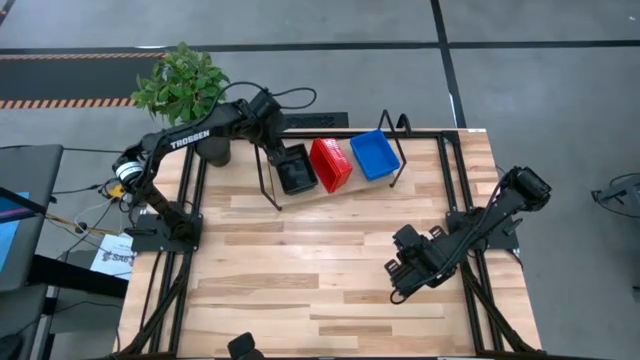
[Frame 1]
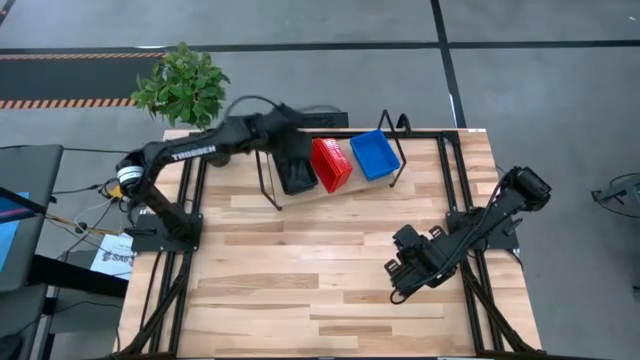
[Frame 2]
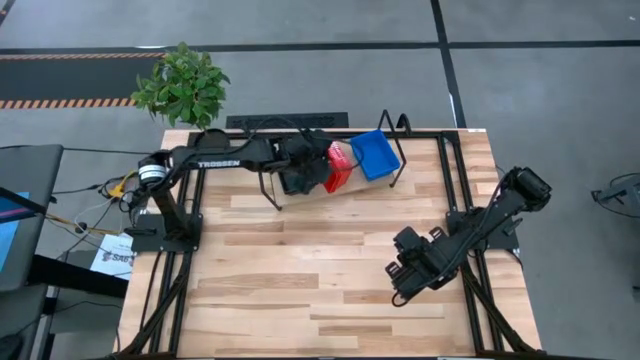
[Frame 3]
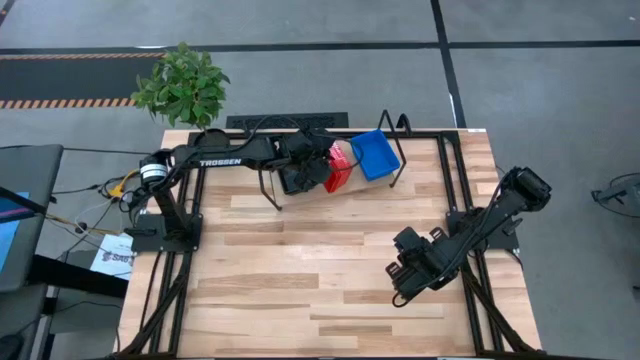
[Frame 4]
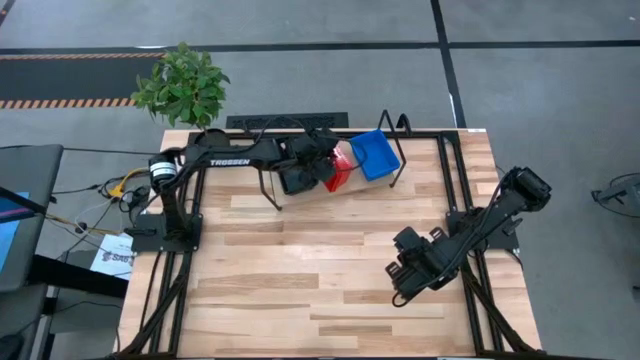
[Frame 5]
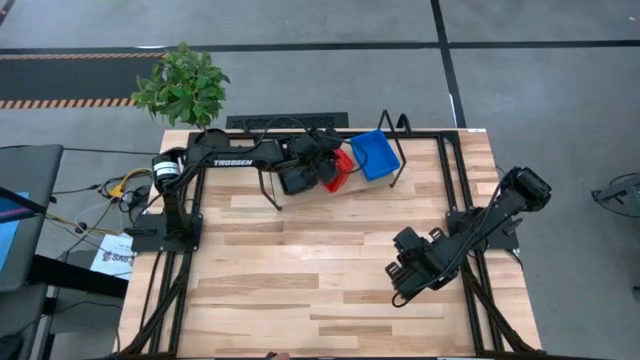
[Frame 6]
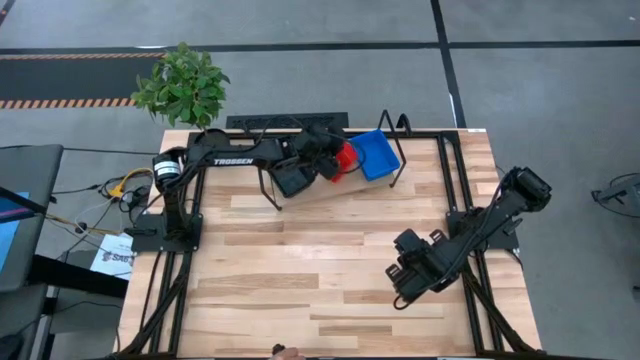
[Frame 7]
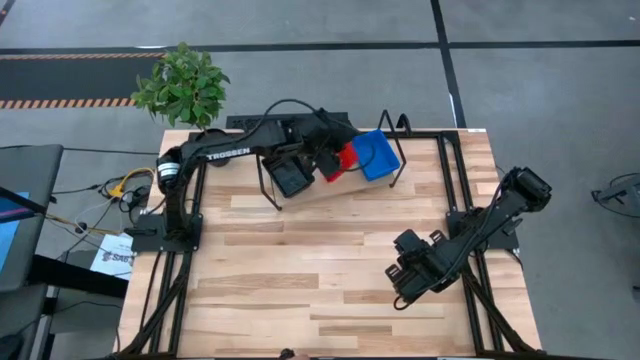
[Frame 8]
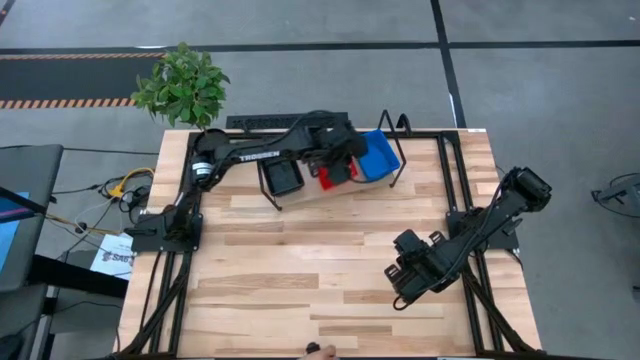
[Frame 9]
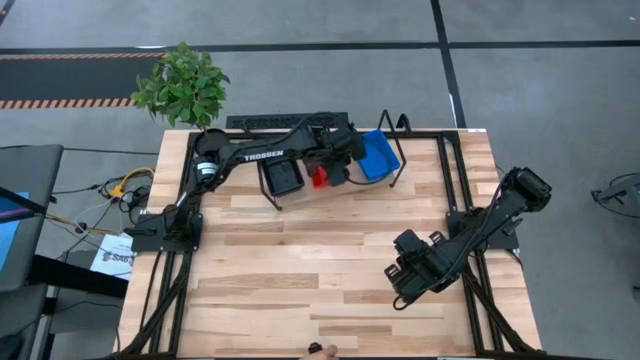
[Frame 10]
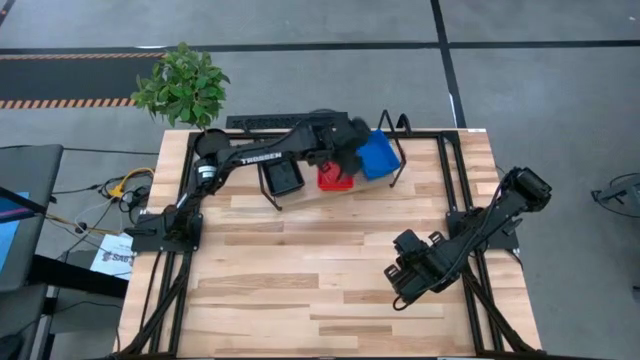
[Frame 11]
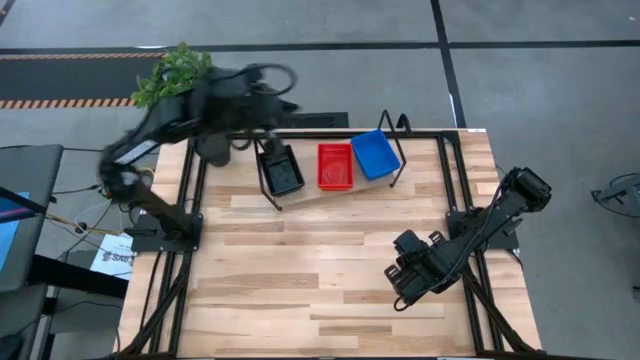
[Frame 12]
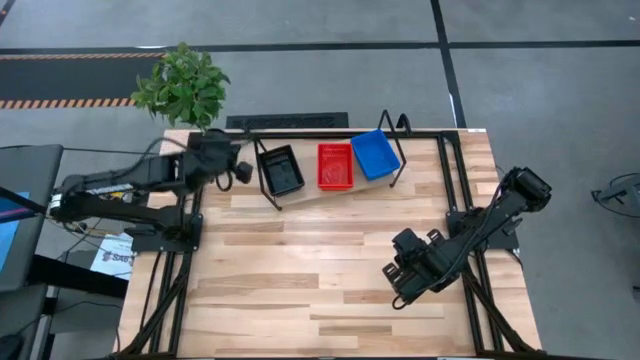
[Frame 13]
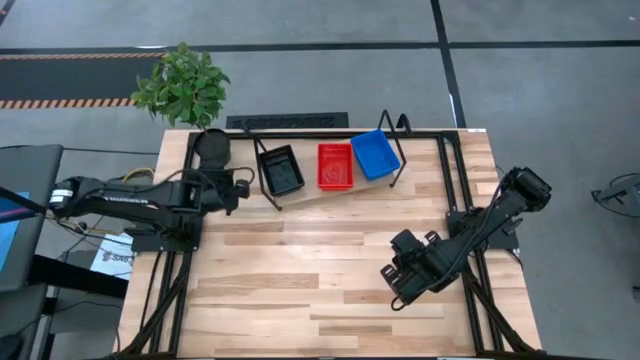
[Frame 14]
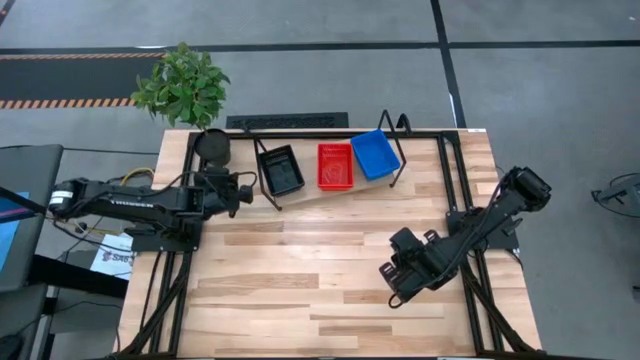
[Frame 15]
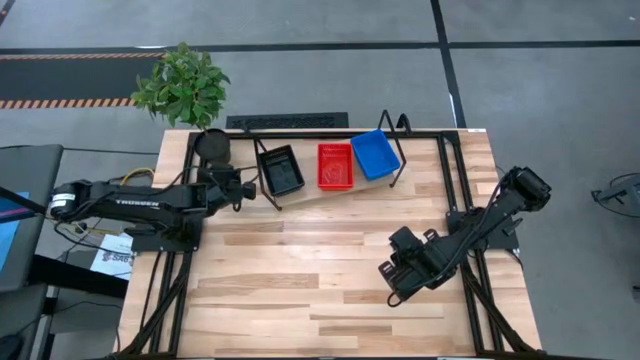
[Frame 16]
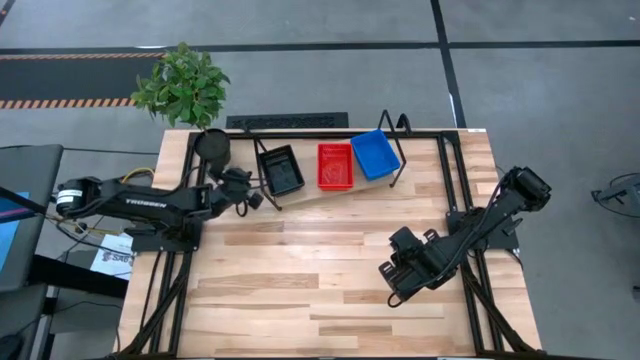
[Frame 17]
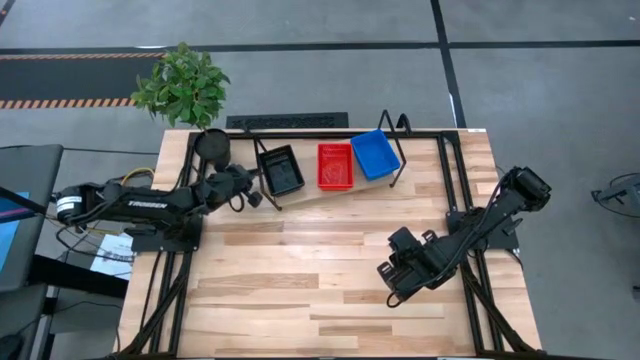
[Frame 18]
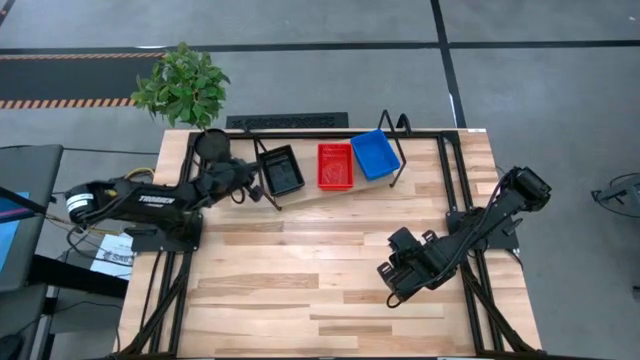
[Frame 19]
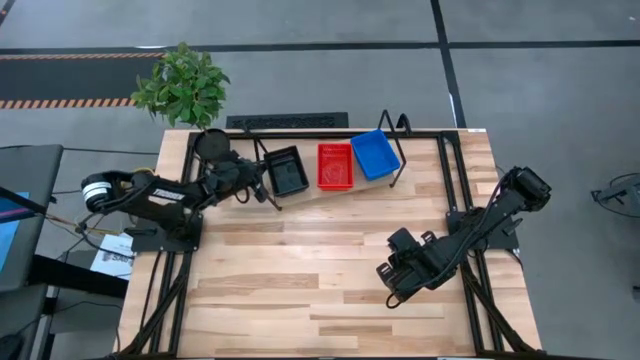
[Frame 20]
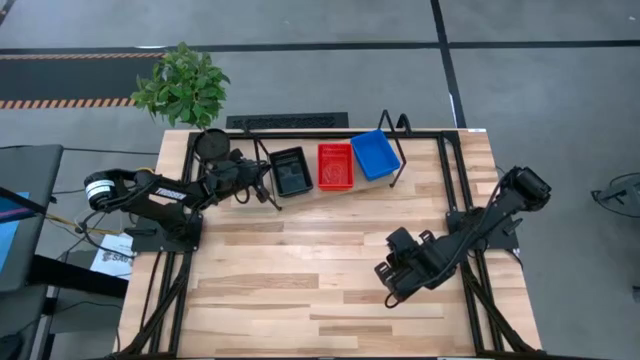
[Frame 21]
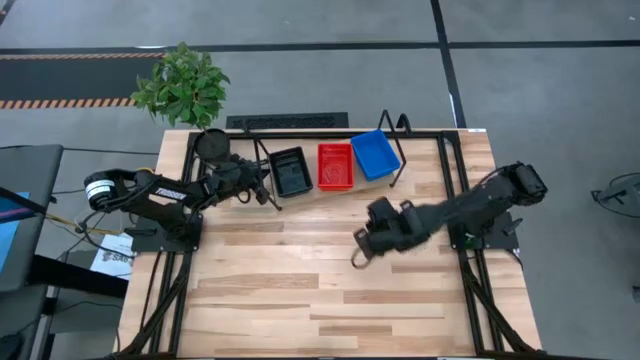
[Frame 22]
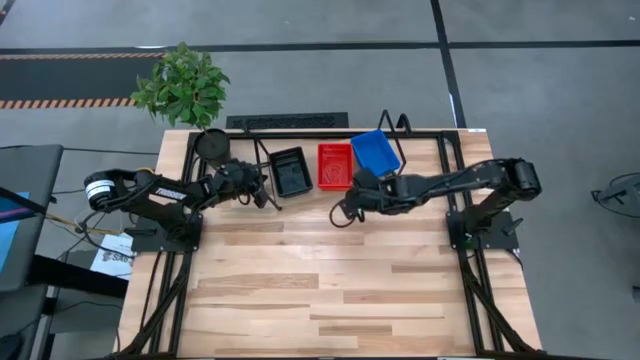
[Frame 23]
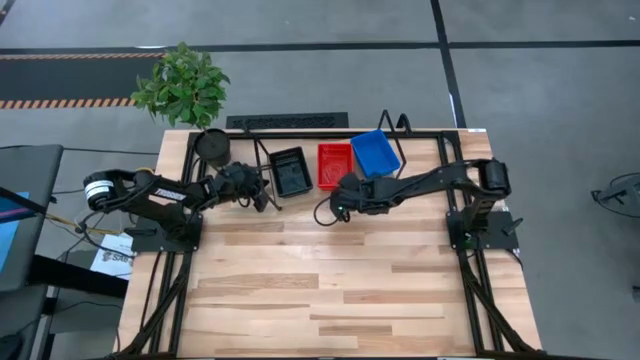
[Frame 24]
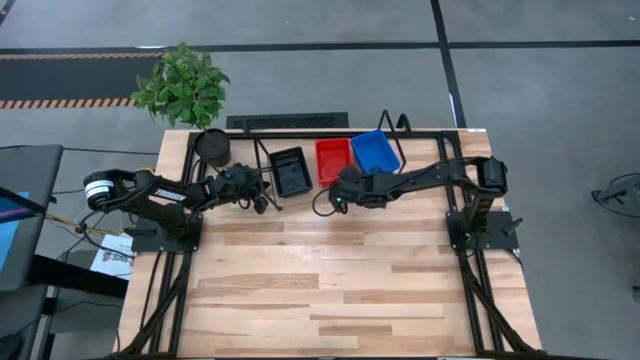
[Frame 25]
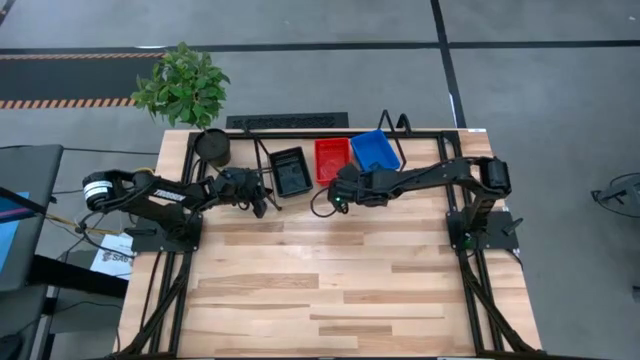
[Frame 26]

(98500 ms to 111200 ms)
Task: Stack baskets on shelf by color
Adjust the bins on the shelf

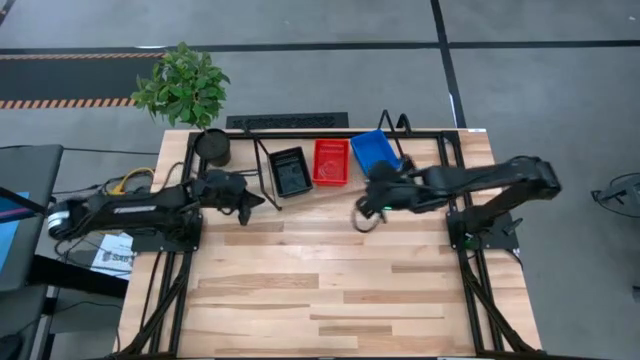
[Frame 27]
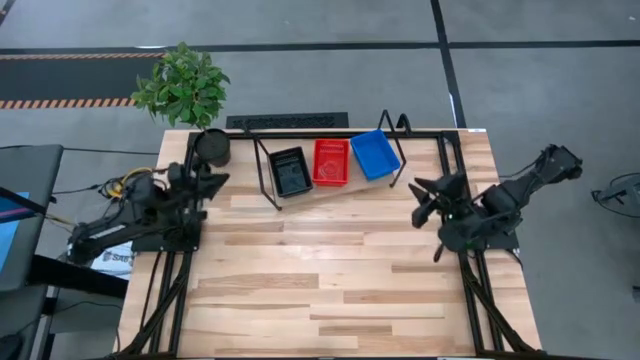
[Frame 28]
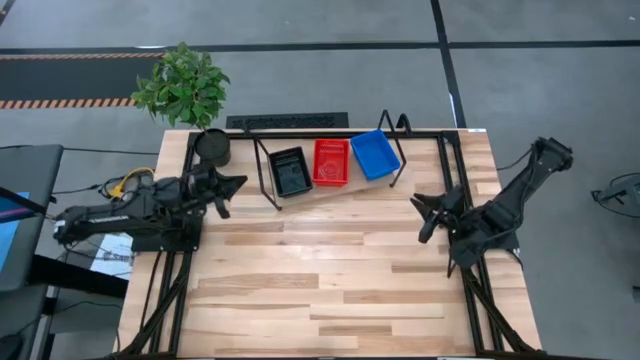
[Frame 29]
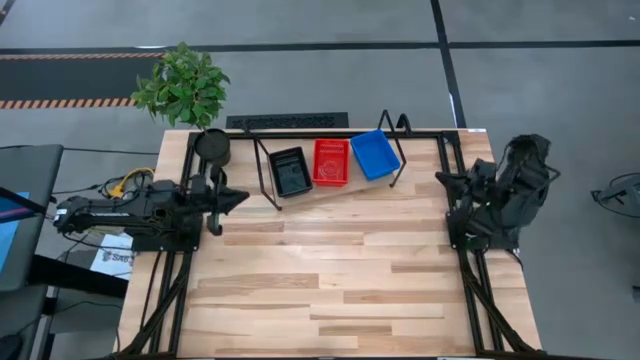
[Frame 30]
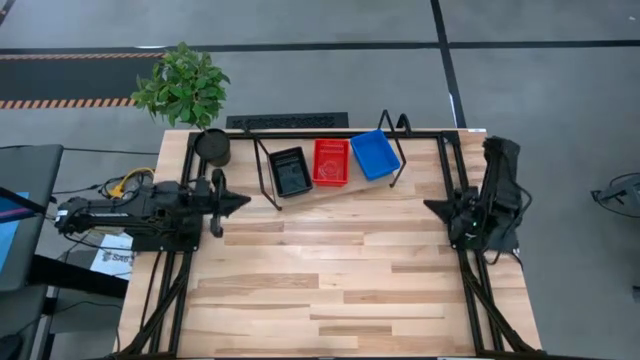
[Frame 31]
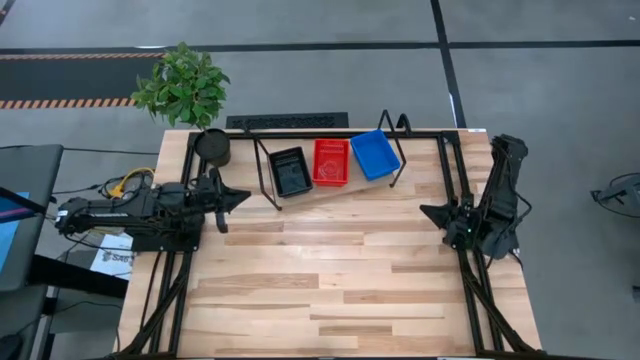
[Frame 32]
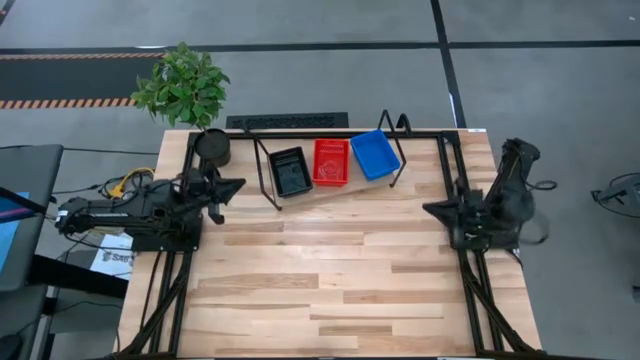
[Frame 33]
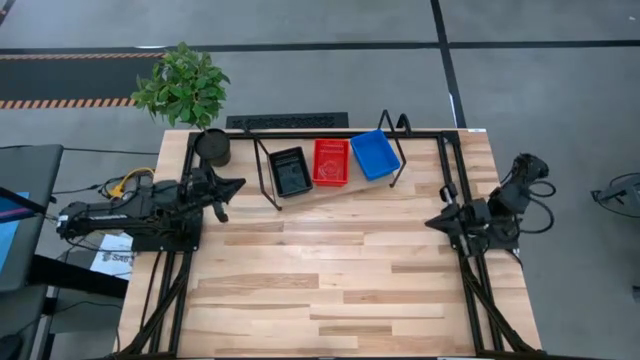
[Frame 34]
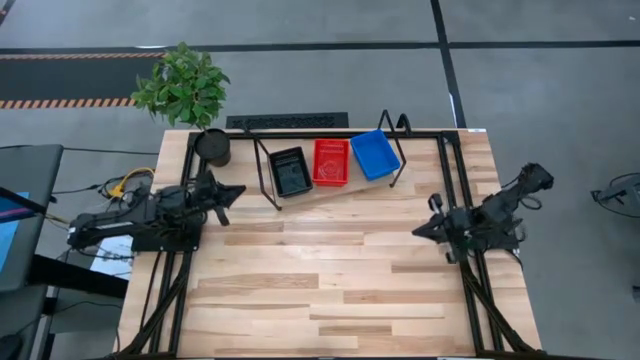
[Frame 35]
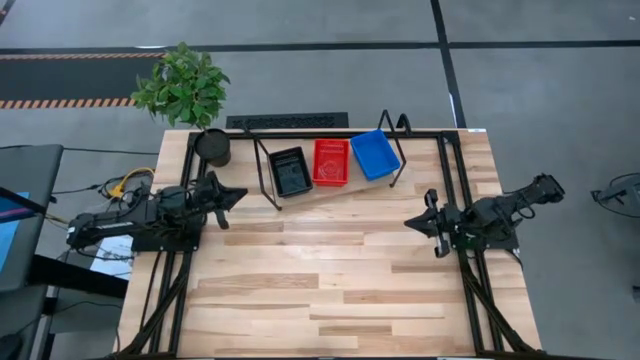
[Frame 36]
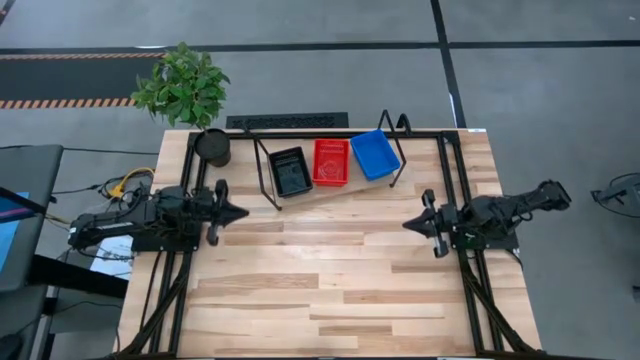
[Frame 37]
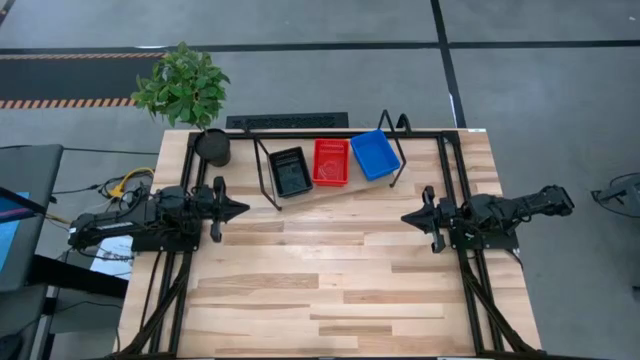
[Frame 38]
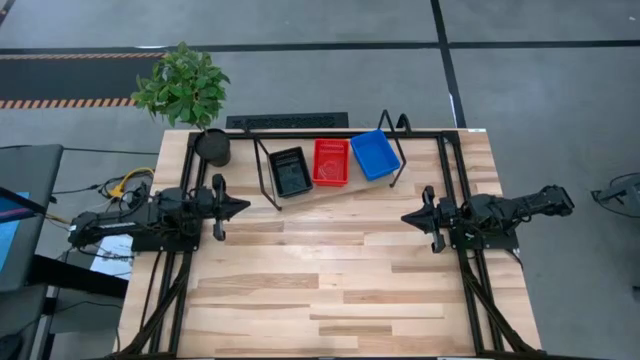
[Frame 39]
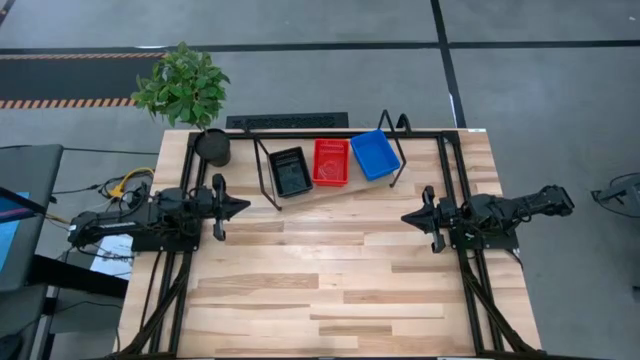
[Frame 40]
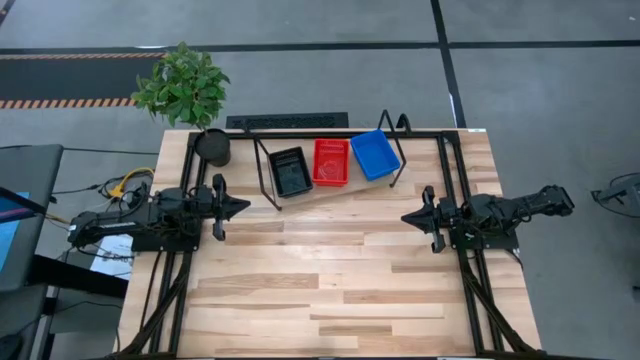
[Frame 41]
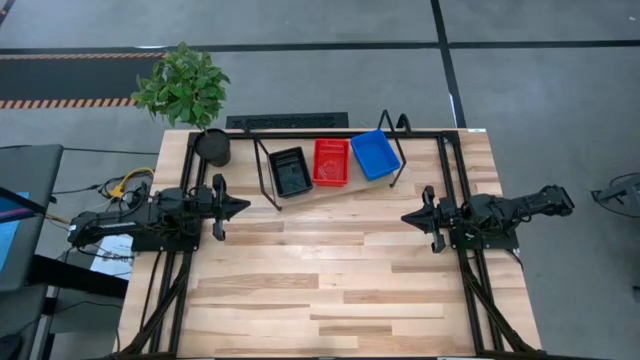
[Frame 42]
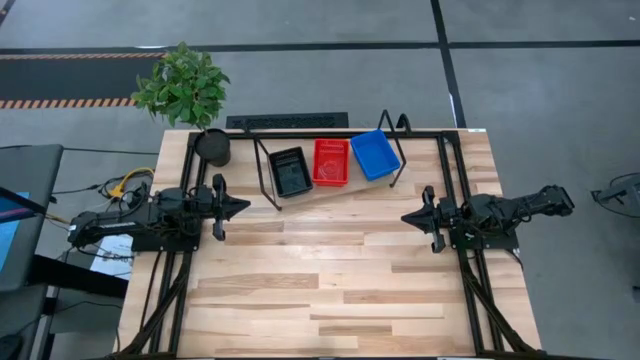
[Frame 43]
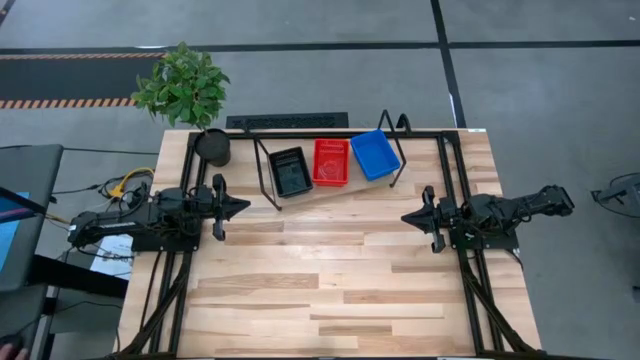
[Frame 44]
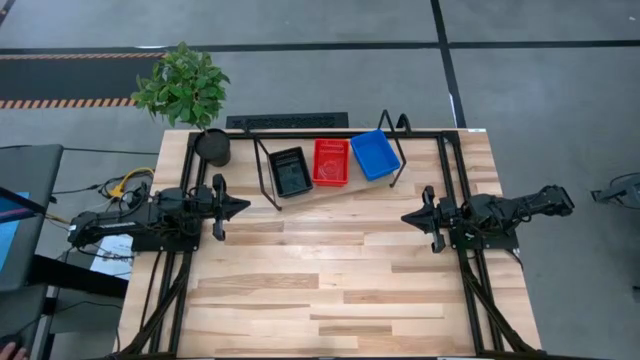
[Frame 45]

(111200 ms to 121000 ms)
Return to Home Position
